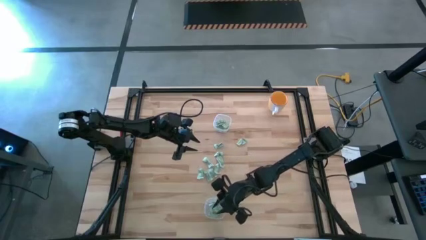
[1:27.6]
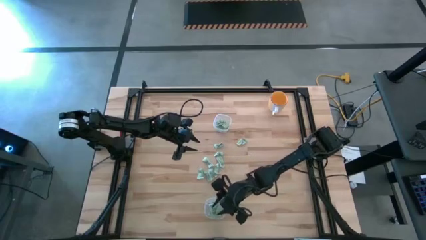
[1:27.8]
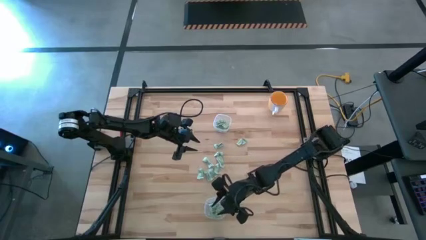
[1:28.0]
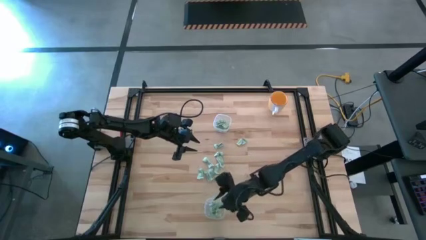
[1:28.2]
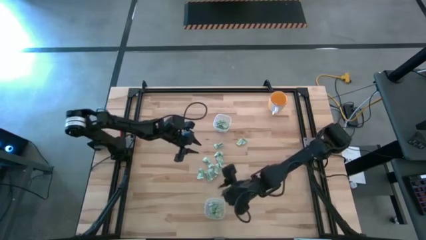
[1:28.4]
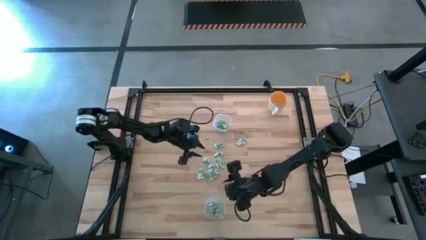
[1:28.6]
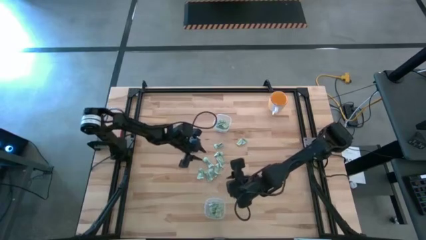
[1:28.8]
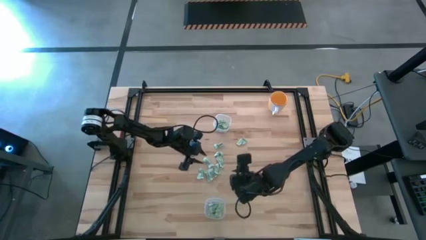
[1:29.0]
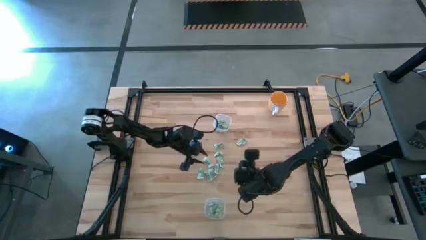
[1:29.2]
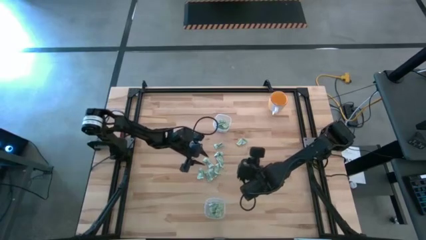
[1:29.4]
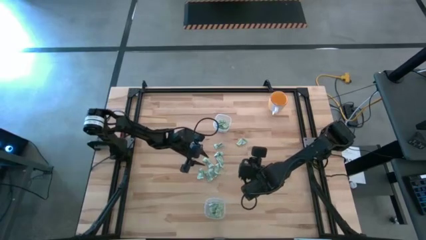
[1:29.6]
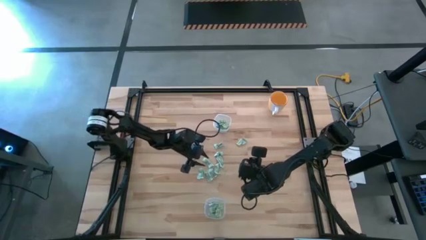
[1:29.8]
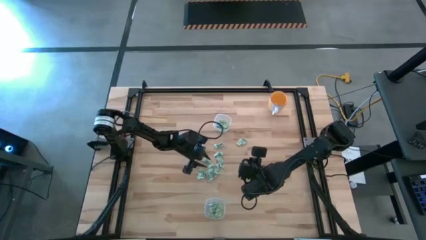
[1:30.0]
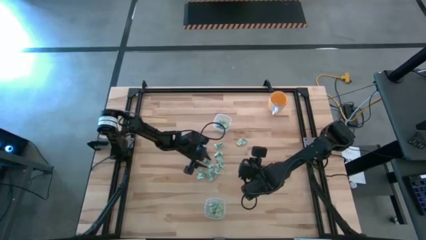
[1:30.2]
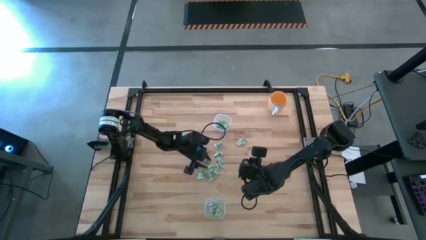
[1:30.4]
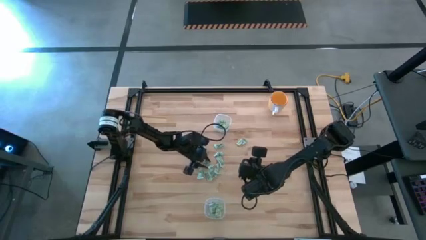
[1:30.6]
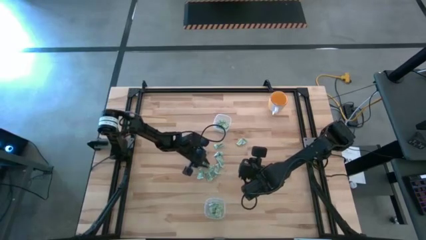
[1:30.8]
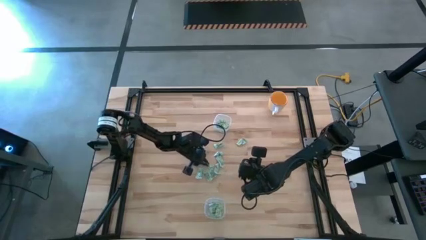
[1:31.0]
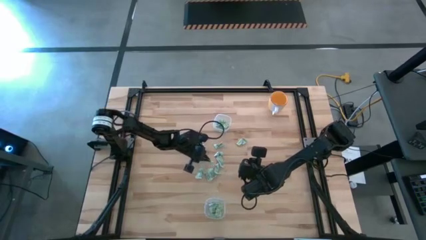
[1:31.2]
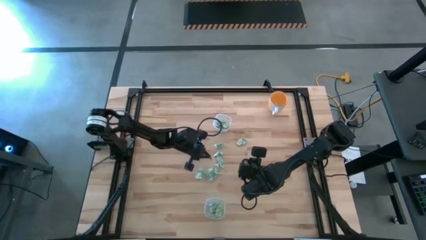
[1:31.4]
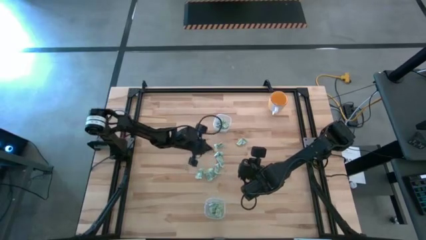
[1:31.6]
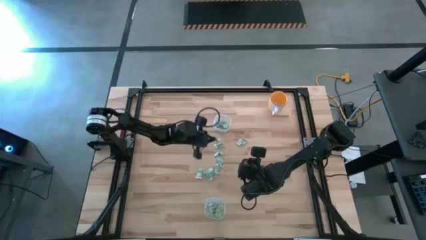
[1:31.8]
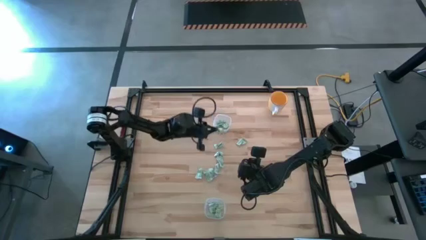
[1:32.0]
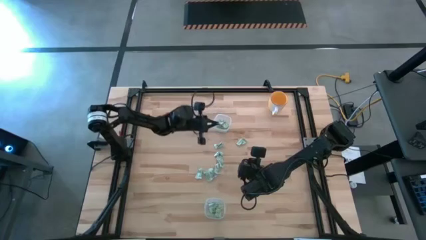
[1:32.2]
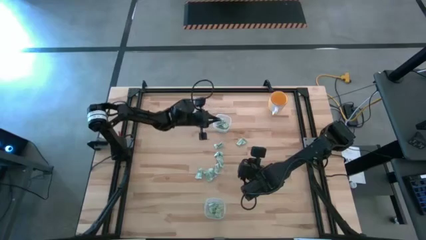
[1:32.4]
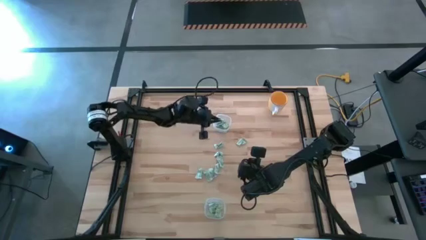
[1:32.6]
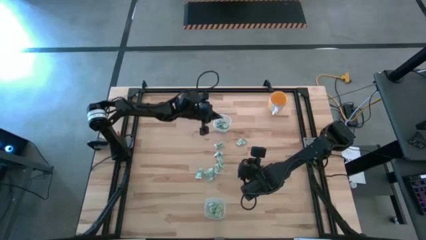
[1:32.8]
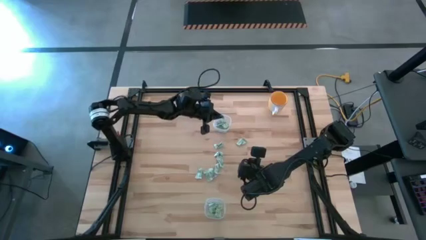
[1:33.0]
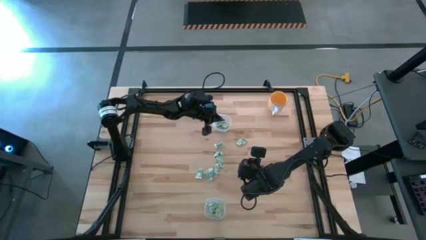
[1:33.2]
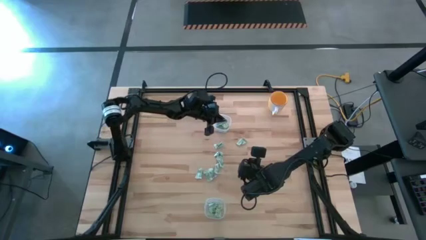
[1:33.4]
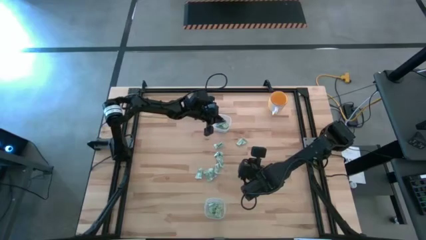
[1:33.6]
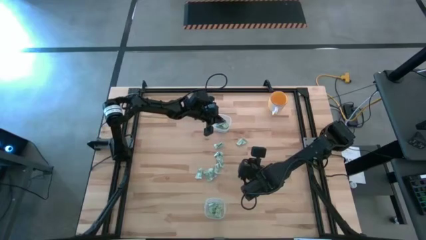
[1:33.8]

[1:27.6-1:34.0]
Task: Pick and place items into bin
Put the stevia packet into the top transparent bin

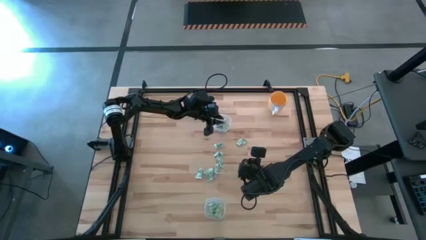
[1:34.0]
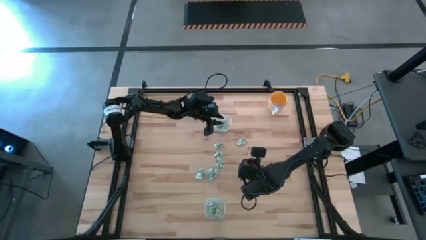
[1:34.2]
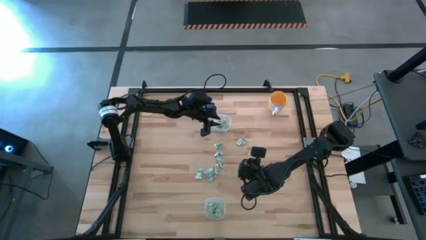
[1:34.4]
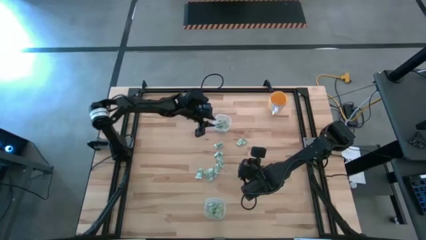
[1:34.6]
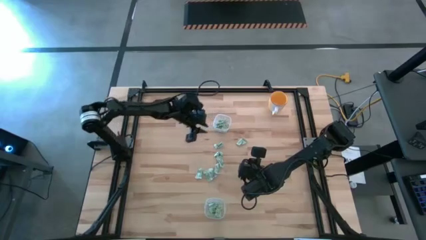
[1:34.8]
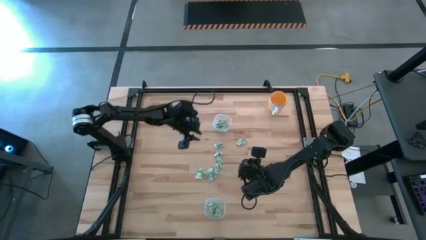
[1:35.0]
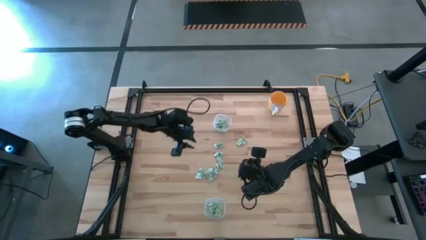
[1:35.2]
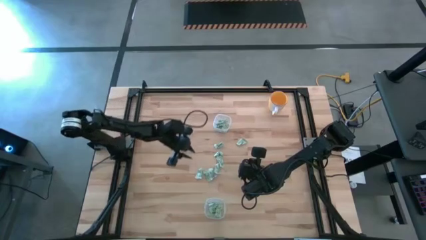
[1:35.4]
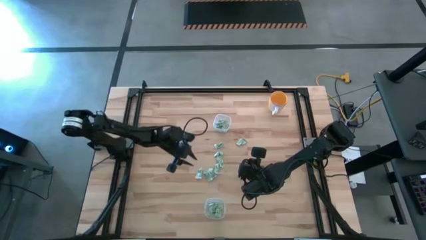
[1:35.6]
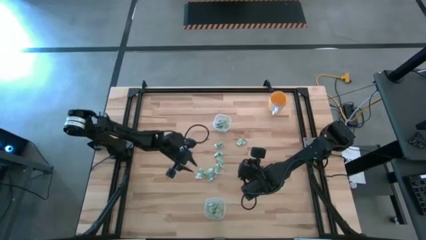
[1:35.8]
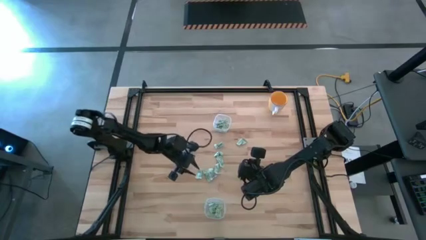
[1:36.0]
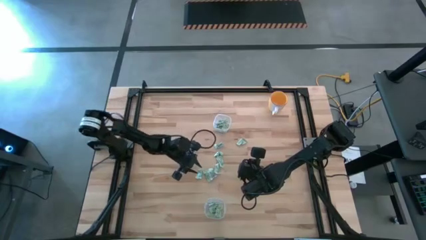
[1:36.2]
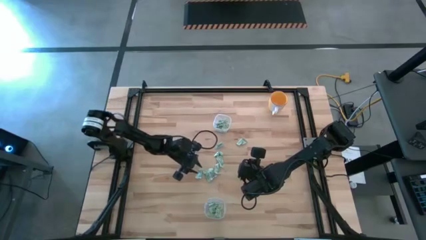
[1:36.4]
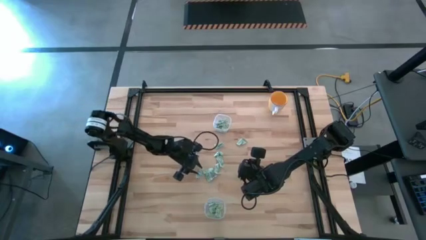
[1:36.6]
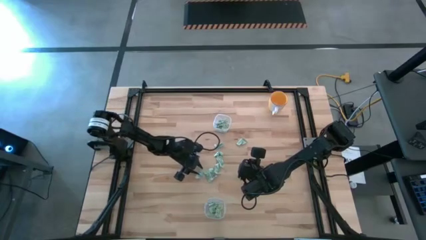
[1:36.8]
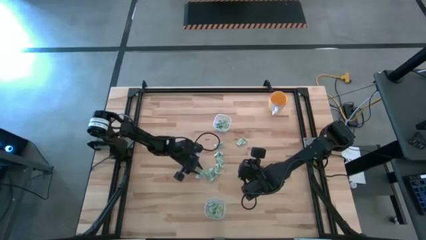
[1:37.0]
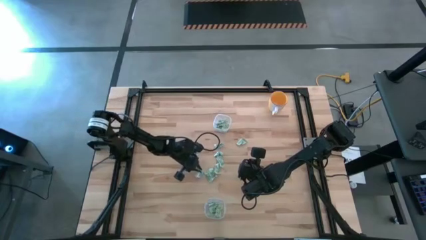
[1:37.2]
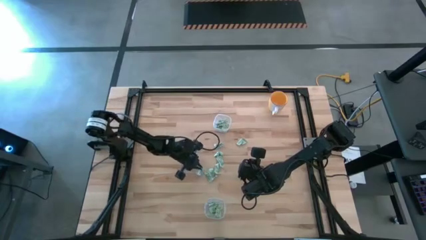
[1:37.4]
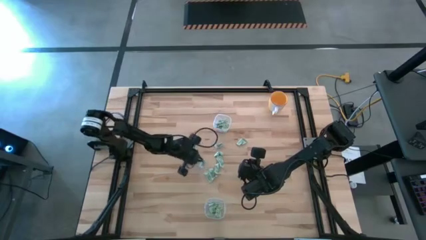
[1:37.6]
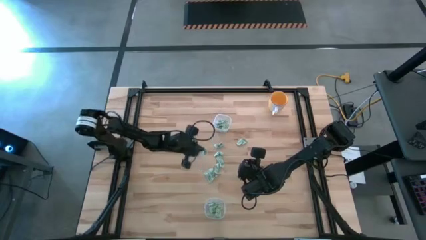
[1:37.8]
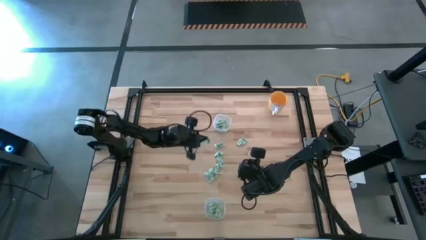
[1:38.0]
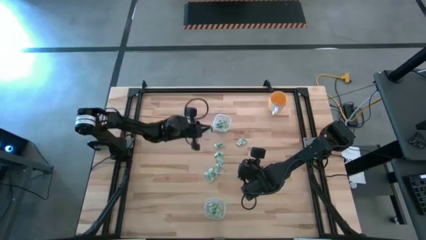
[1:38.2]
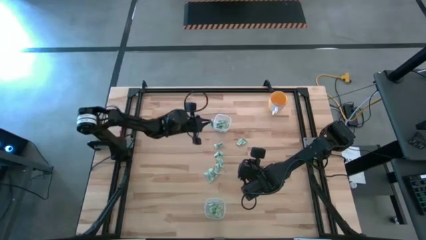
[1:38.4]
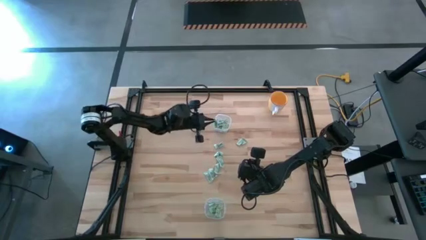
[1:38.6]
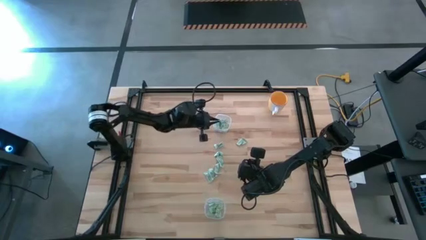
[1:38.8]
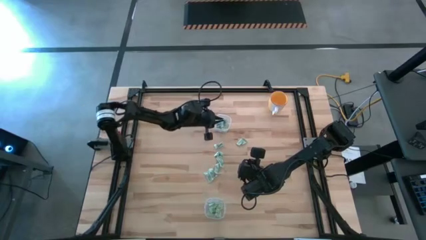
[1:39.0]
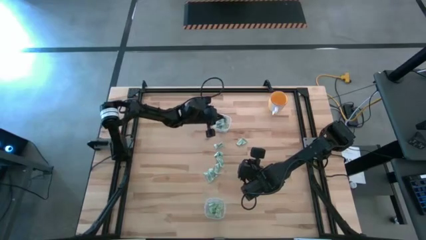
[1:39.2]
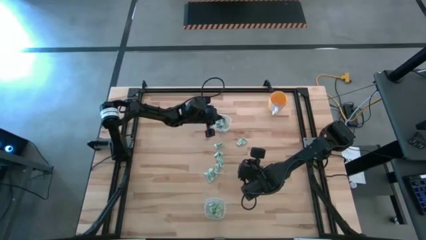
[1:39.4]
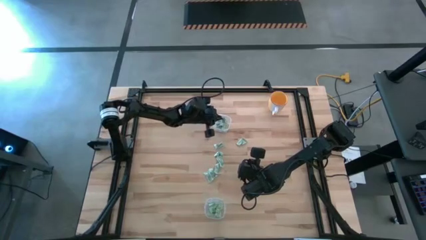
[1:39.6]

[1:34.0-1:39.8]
Put the stevia packet into the top transparent bin

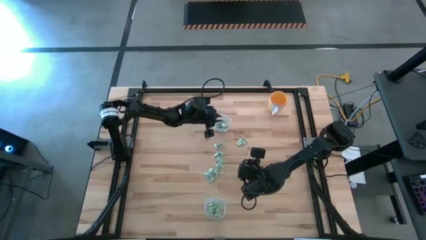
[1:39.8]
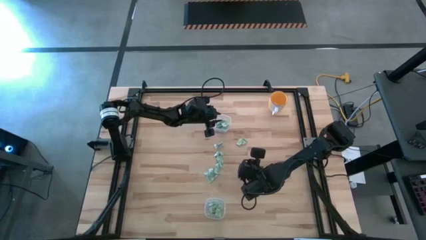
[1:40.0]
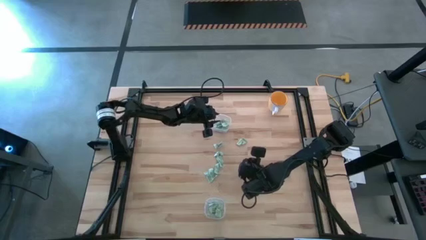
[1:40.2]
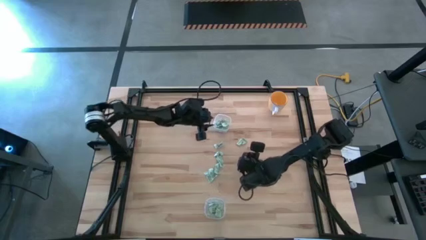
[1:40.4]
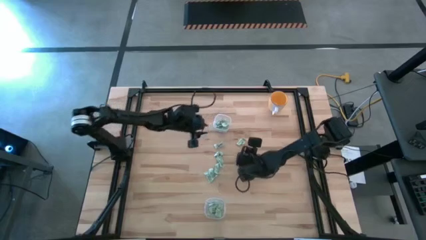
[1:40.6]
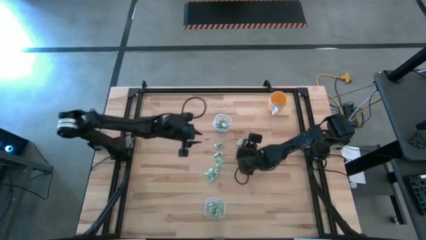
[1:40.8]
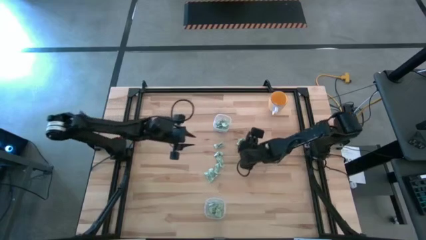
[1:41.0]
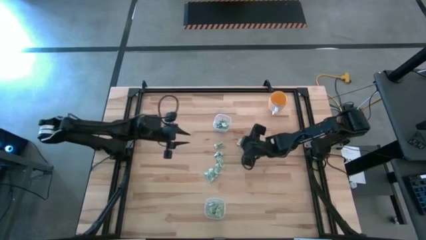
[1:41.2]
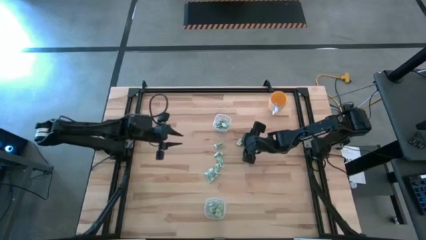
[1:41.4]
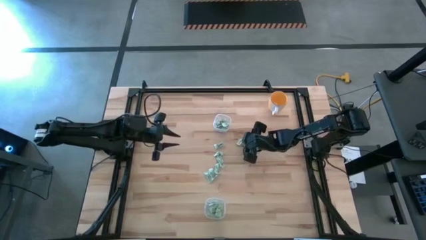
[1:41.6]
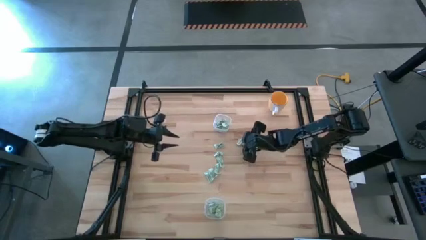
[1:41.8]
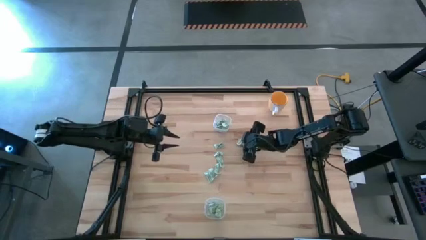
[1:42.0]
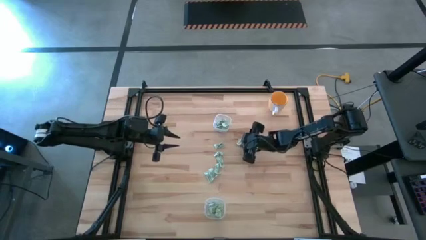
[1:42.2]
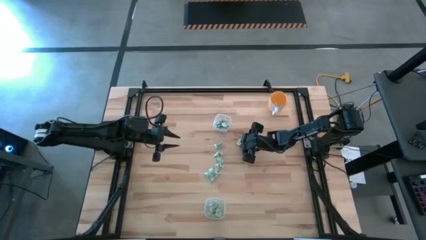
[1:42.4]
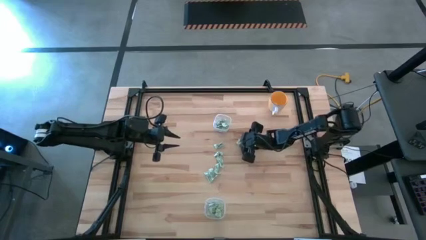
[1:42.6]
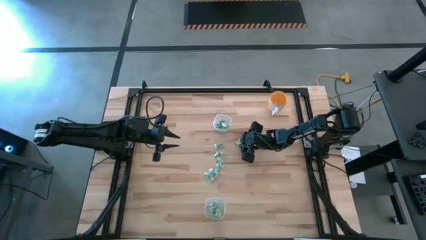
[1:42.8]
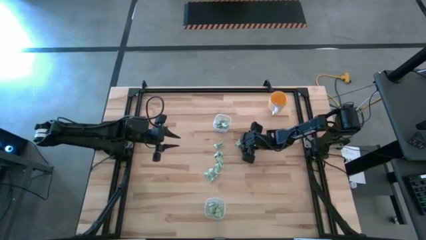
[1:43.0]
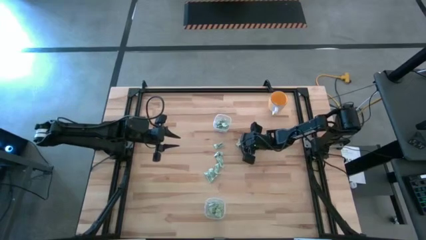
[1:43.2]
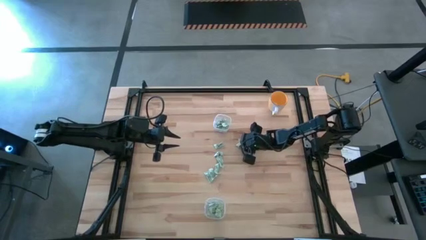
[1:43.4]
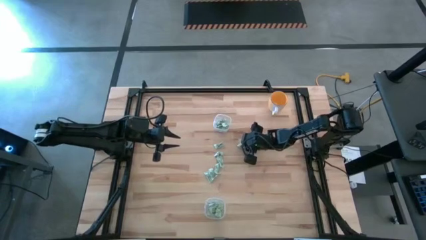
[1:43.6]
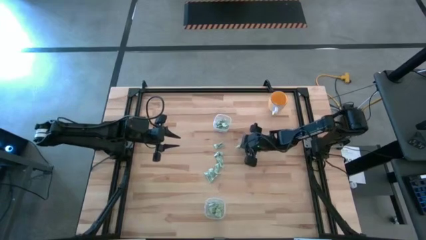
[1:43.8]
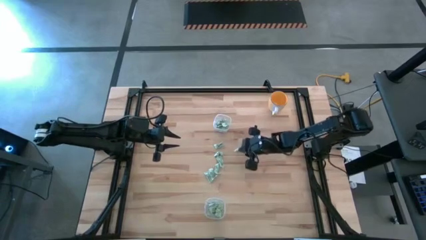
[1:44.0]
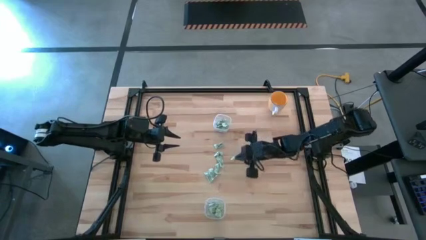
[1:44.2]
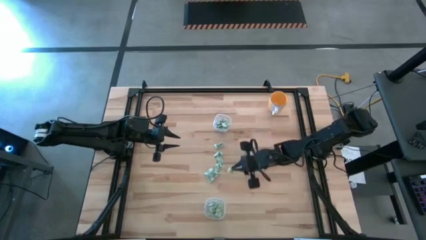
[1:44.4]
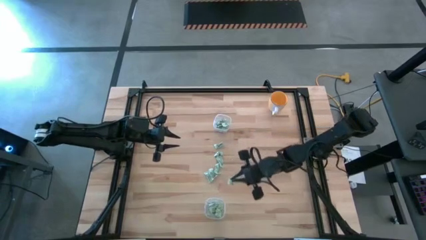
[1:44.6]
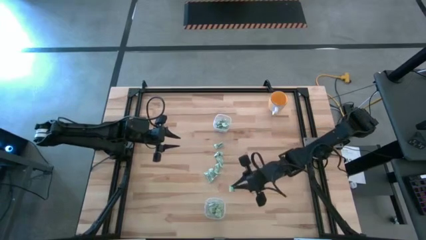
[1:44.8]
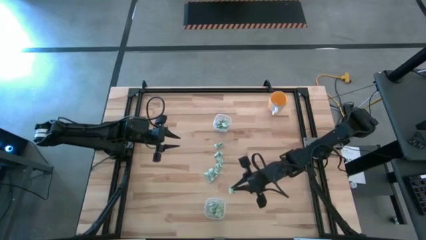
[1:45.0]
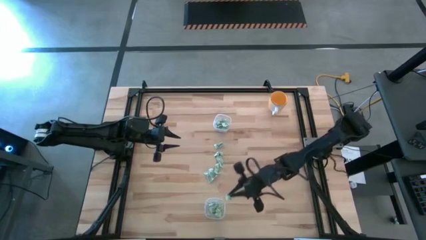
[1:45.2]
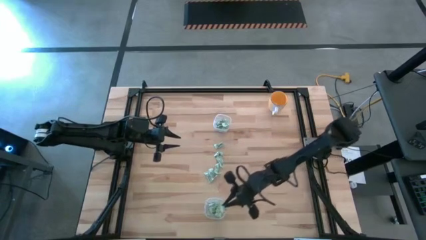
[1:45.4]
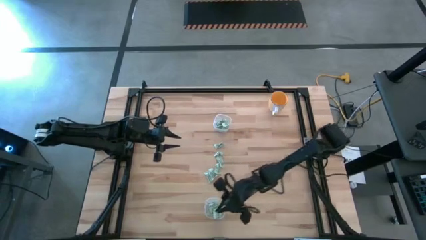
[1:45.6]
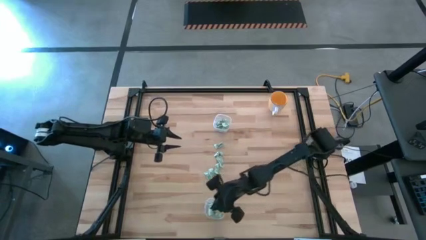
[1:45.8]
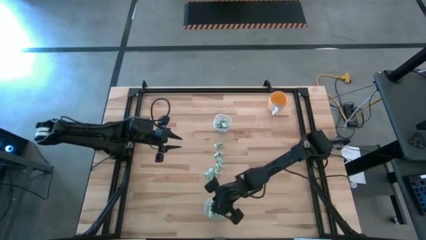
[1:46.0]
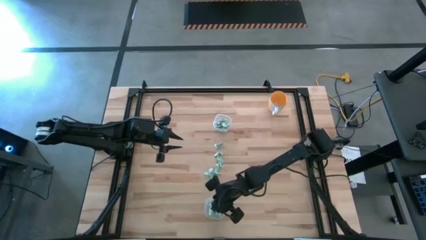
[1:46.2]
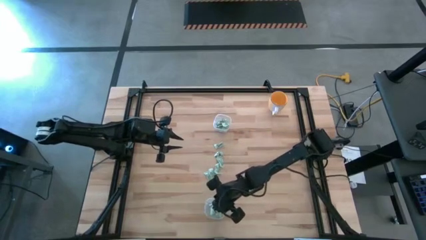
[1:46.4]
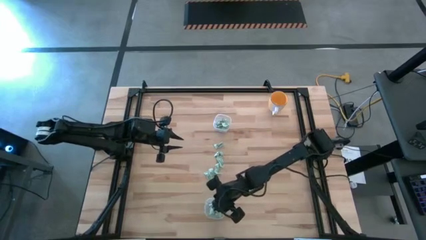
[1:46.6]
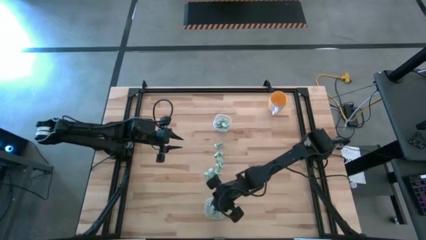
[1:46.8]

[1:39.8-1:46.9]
Put the stevia packet into the bottom transparent bin
